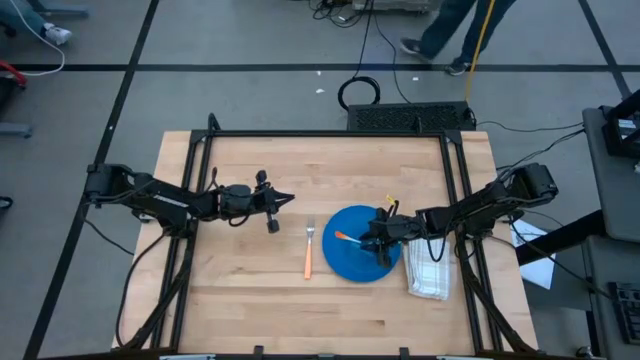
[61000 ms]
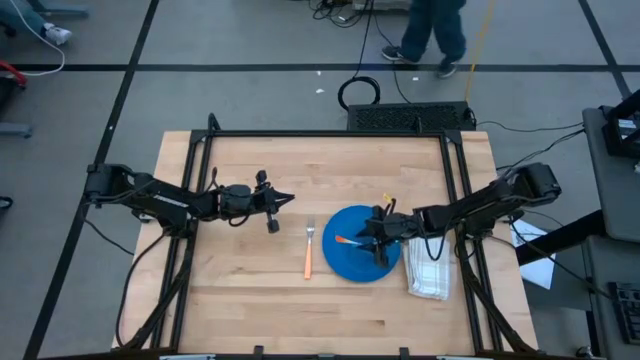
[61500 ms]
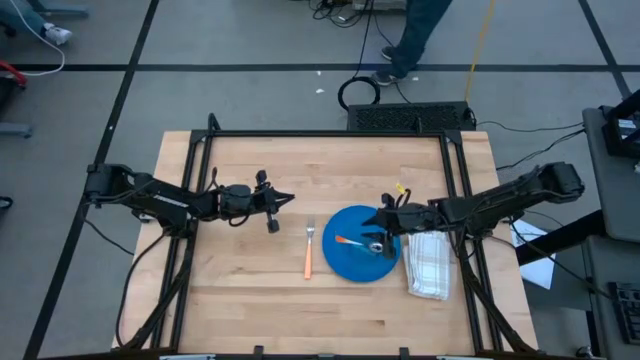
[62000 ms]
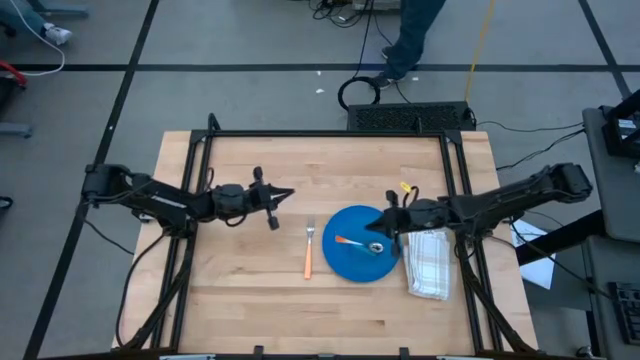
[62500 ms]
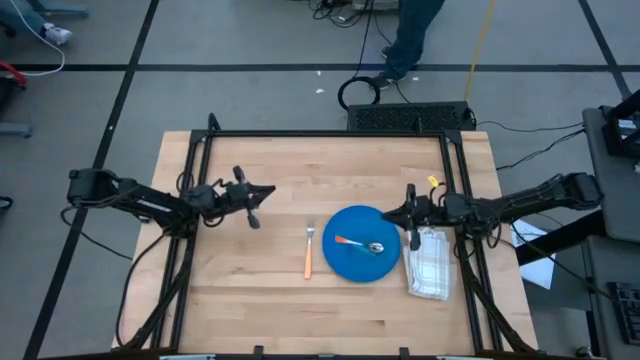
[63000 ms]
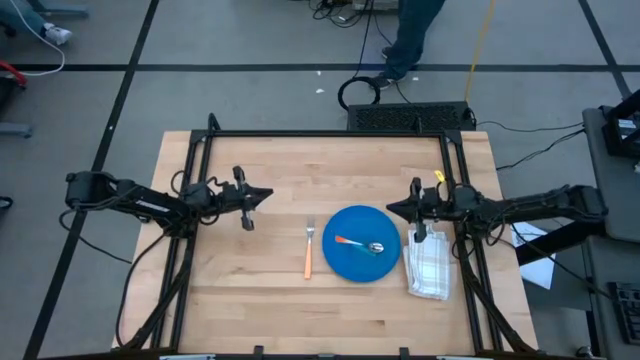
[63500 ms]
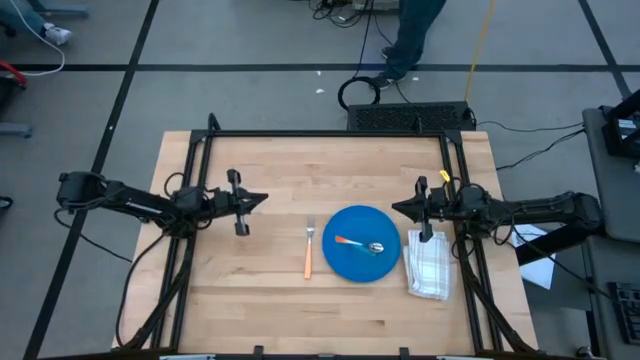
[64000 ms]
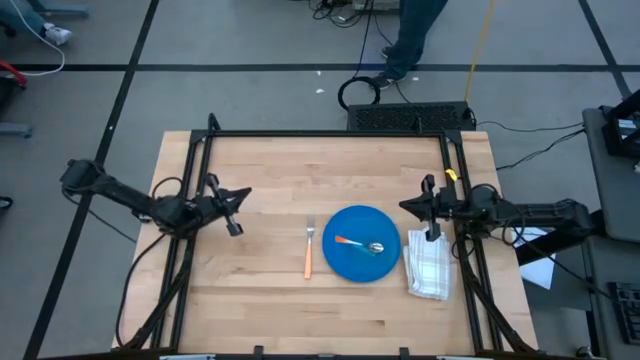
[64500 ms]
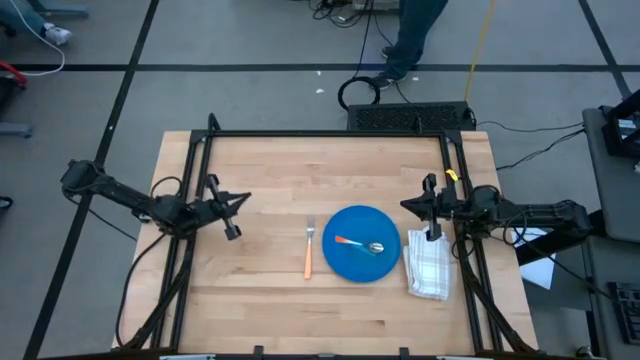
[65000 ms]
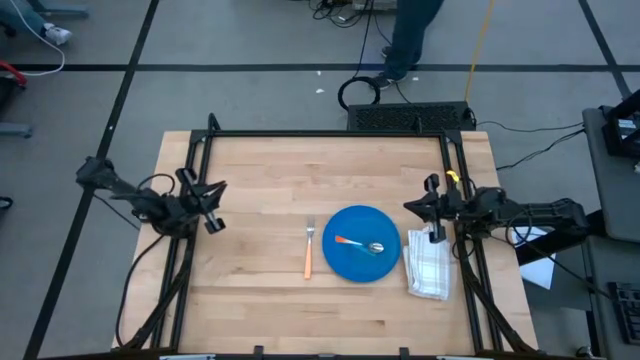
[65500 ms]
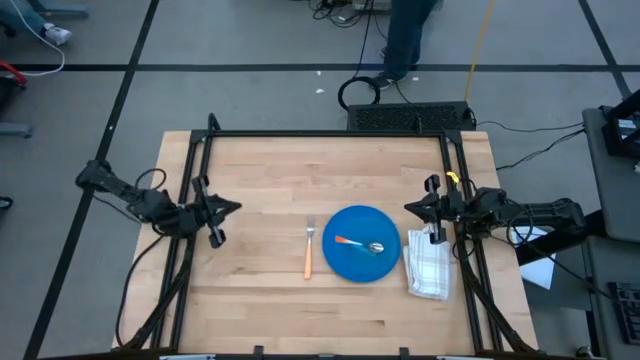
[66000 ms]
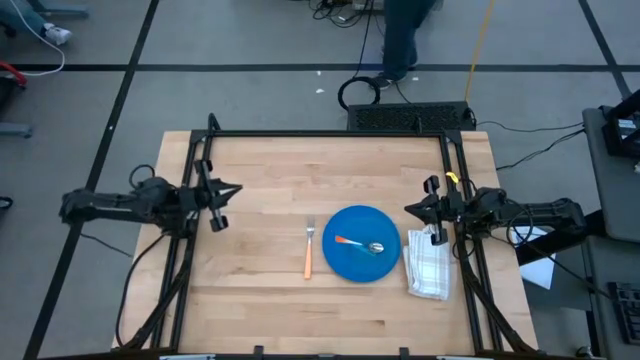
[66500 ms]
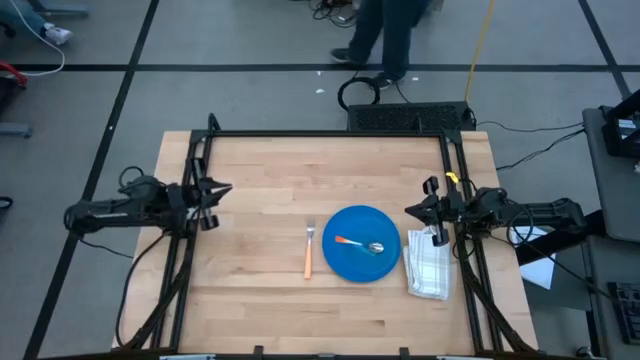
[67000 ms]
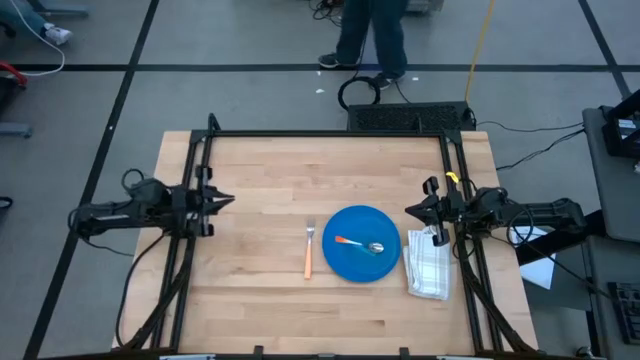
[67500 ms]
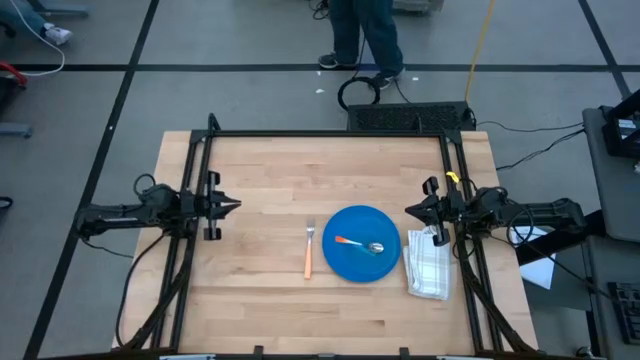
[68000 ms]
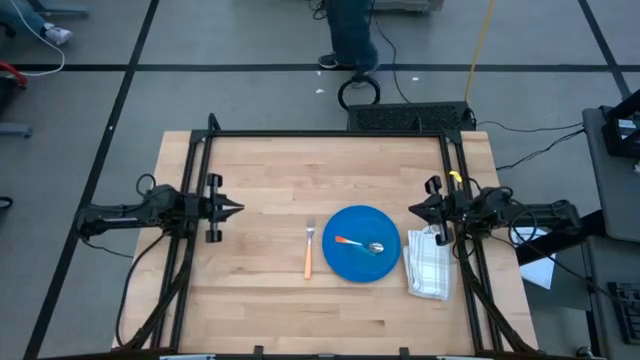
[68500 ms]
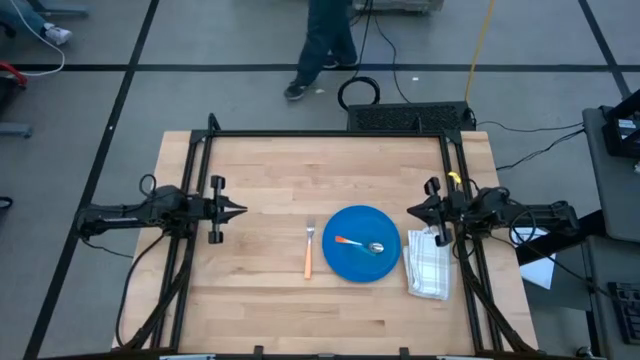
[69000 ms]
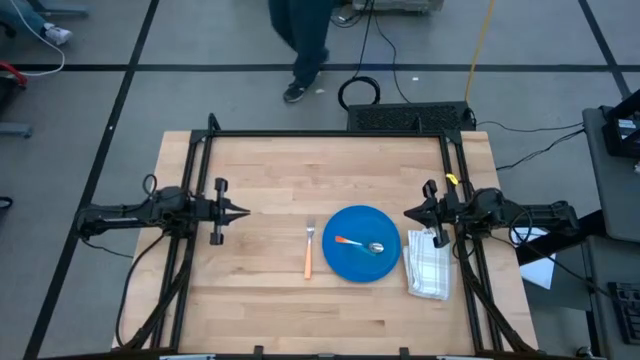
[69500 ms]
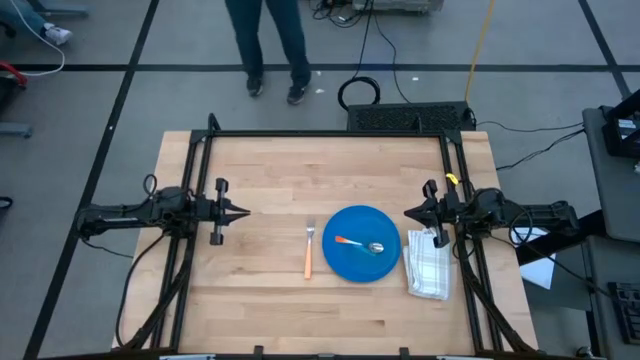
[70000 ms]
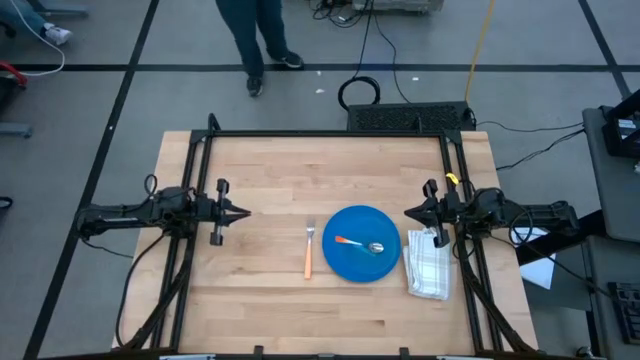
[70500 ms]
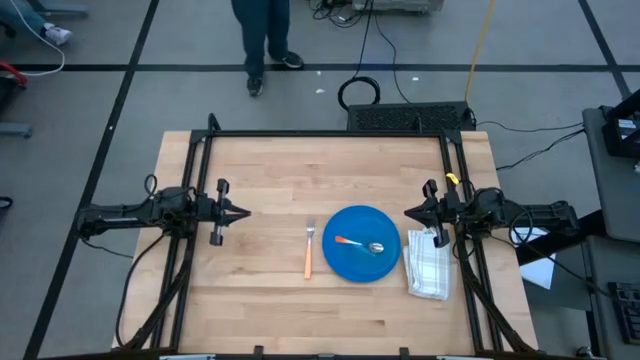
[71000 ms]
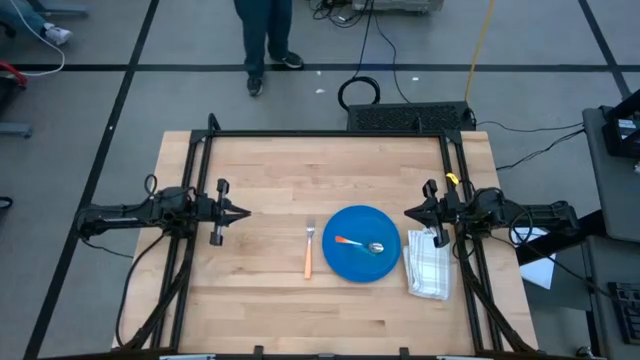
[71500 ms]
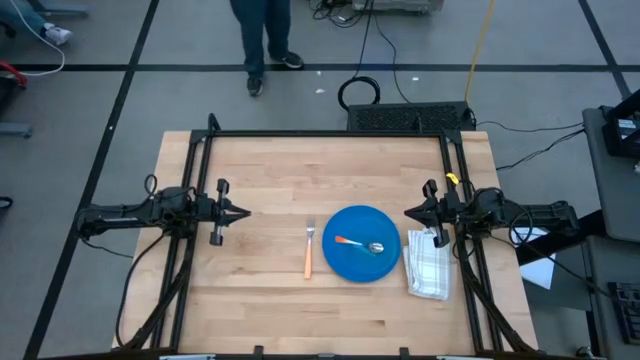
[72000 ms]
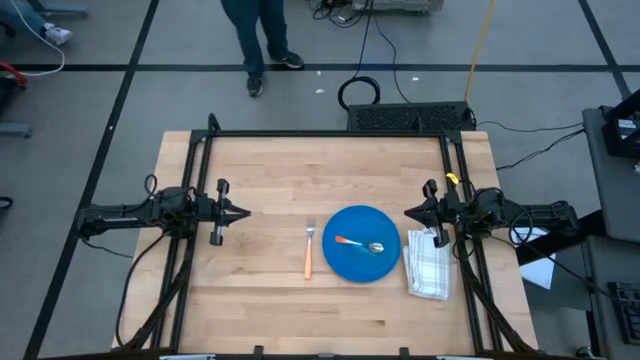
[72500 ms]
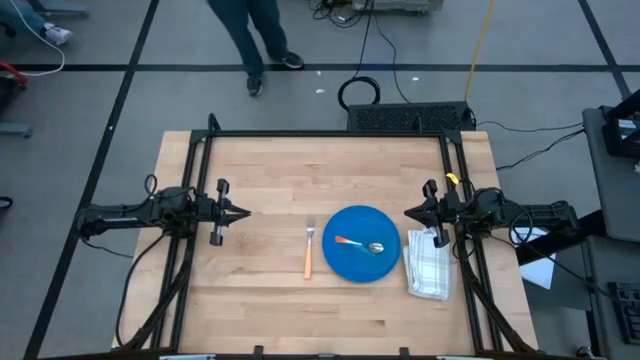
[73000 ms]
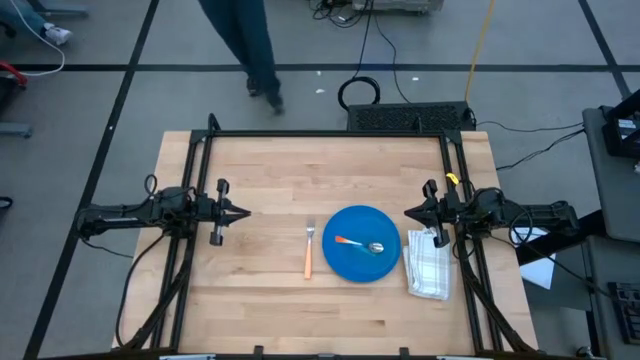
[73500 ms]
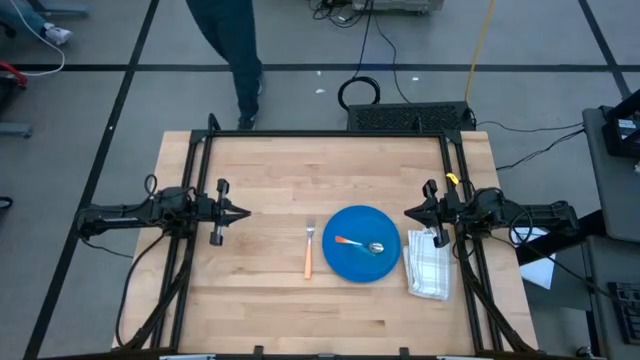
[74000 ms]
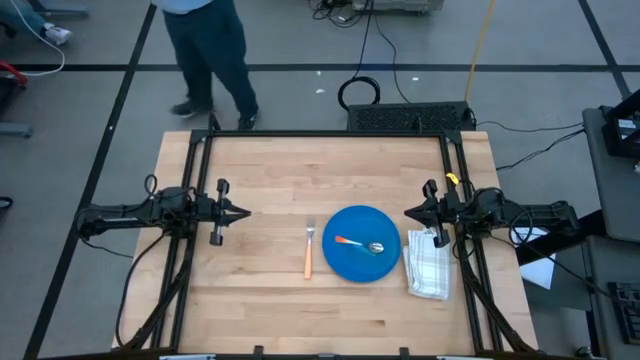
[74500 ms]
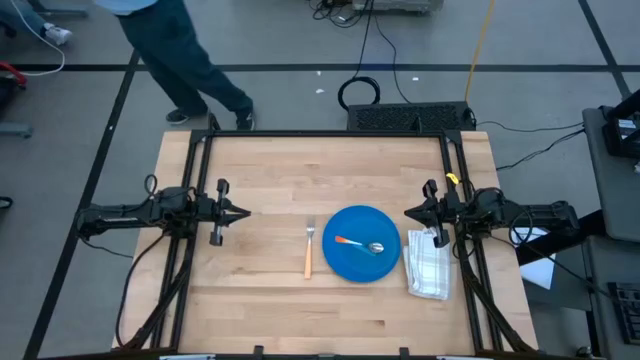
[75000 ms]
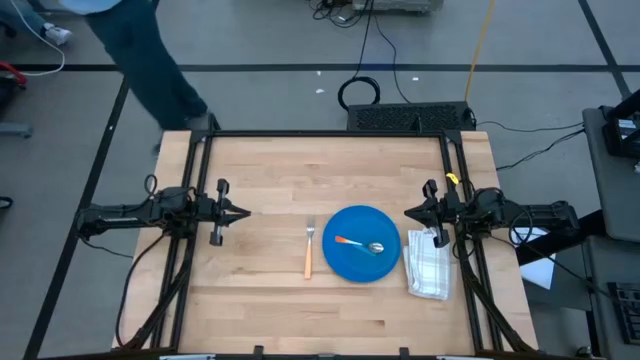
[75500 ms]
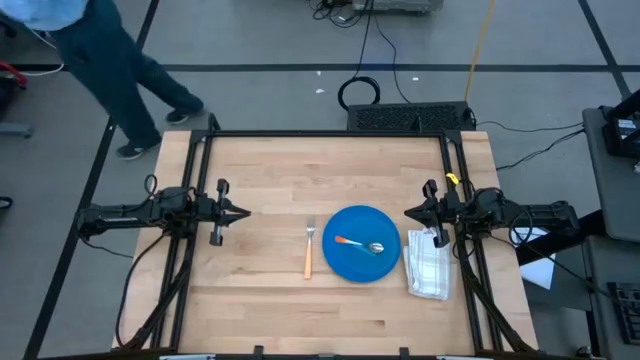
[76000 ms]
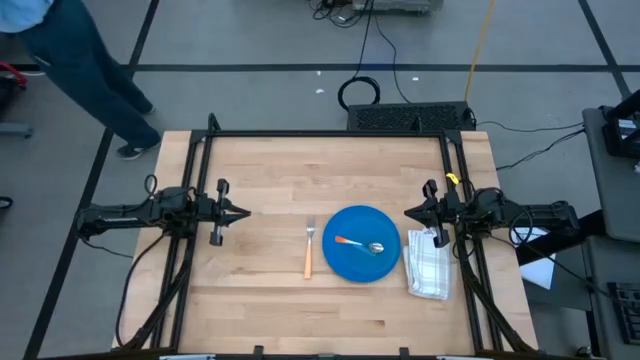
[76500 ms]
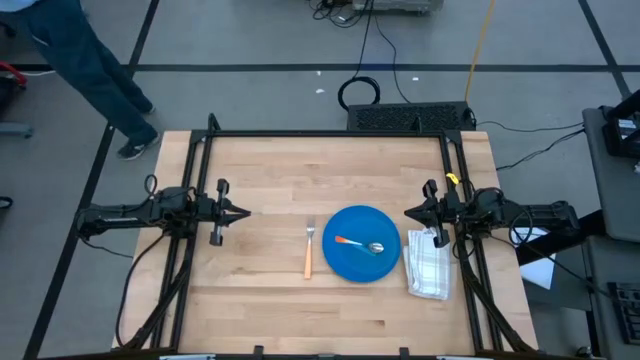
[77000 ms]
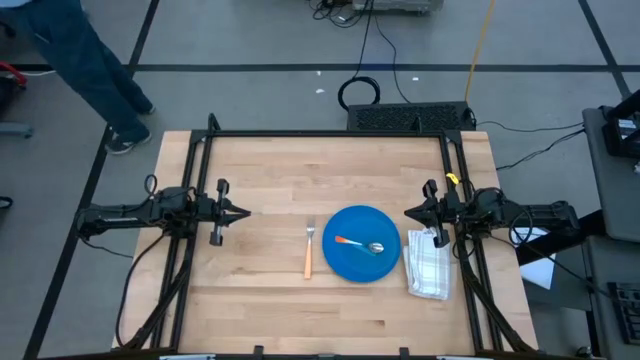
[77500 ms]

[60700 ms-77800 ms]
Task: Set table place
Return to Home Position

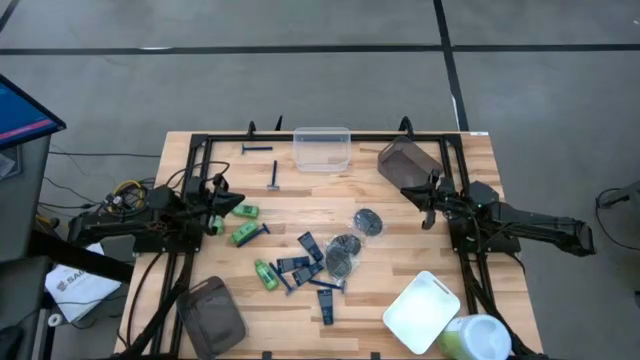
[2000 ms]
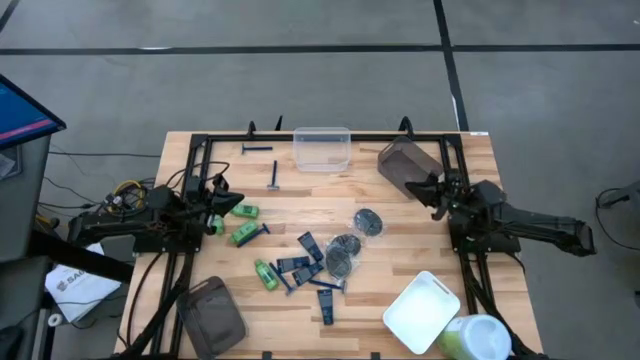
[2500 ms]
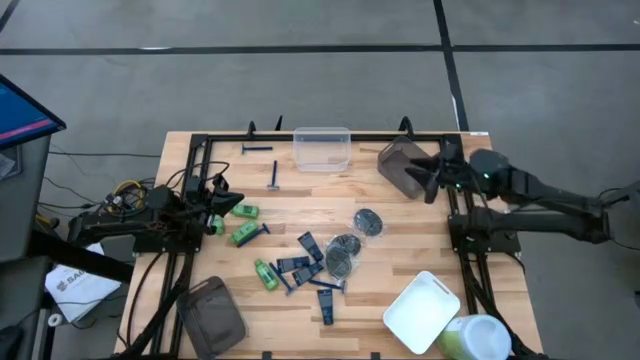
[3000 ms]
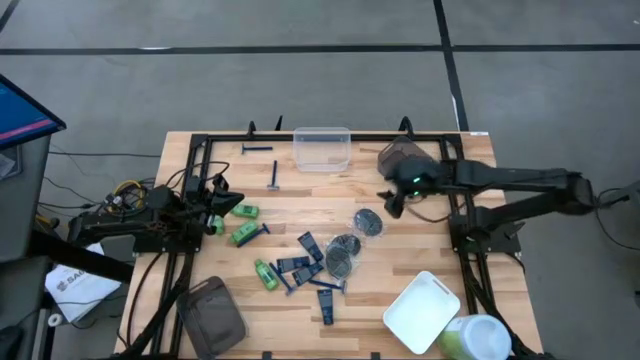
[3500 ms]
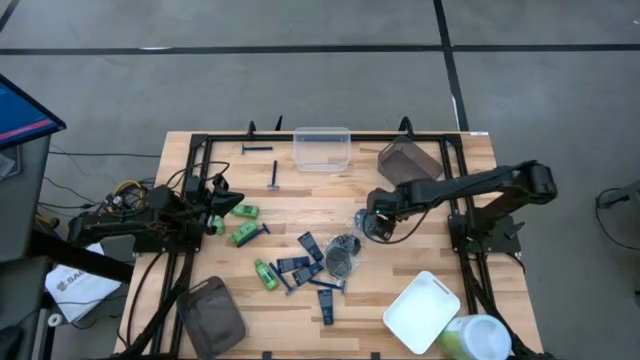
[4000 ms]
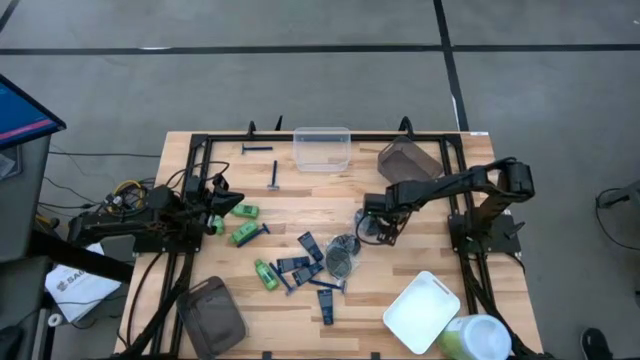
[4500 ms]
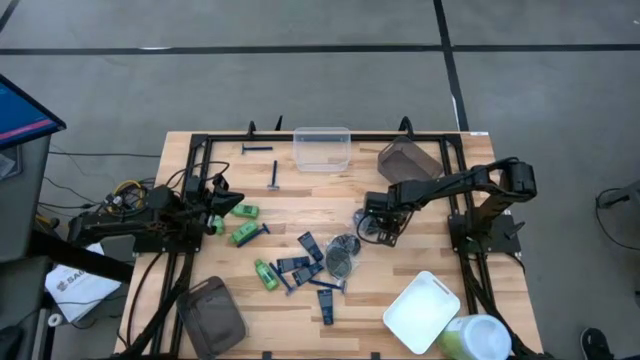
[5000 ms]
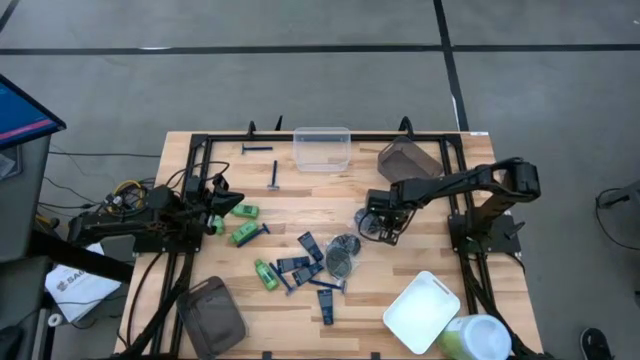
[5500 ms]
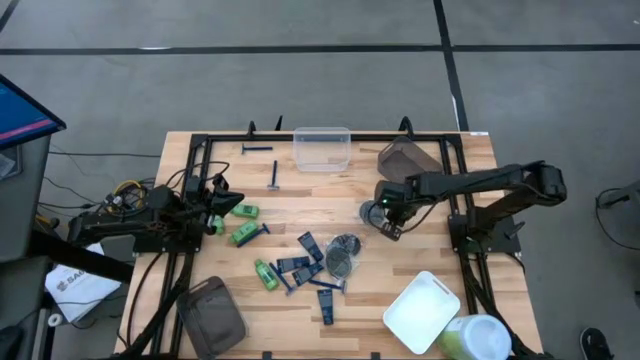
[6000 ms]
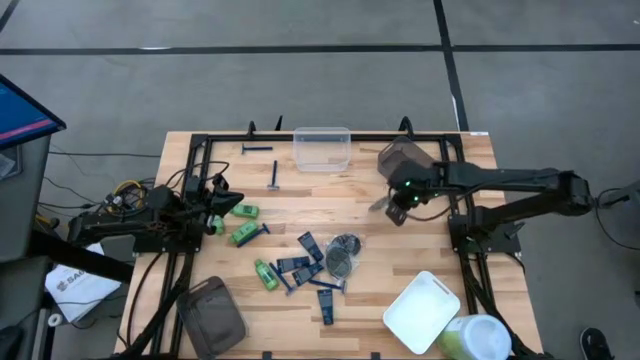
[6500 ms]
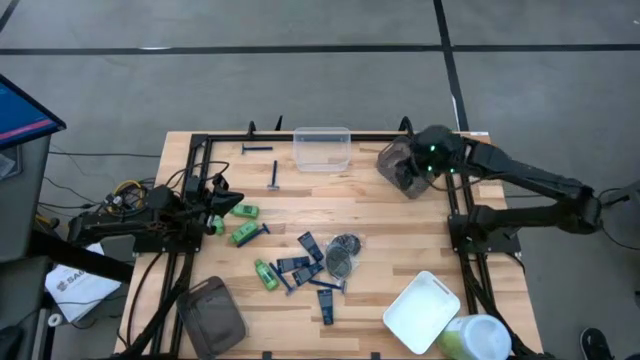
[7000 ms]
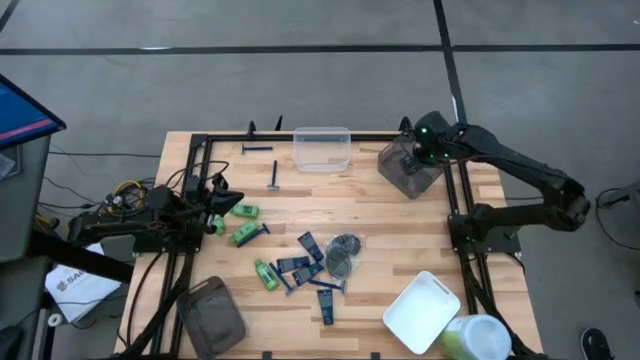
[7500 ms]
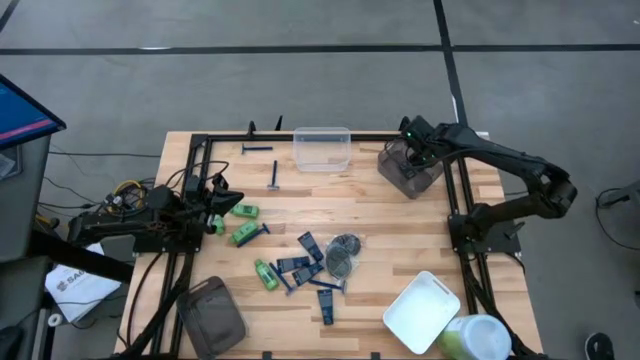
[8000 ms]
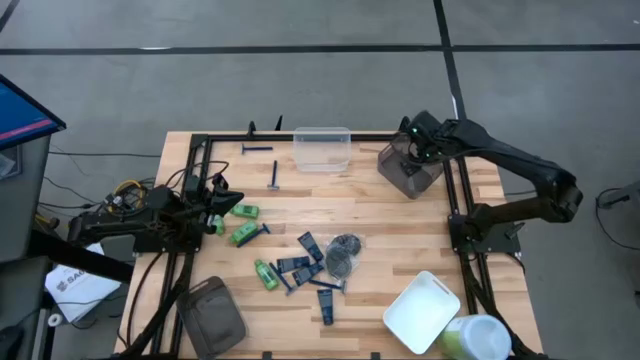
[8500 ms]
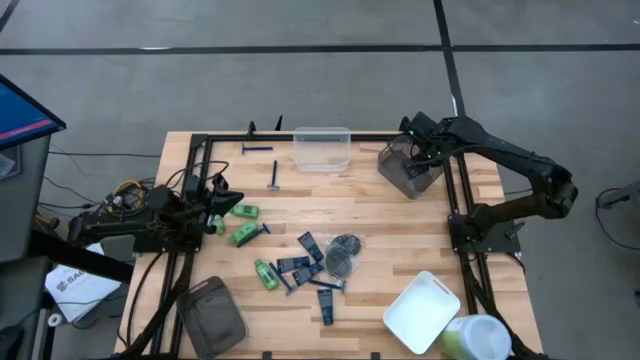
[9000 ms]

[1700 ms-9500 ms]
Task: Pick & Place Travel size toiletries
Put the black hairbrush into the top black bin
